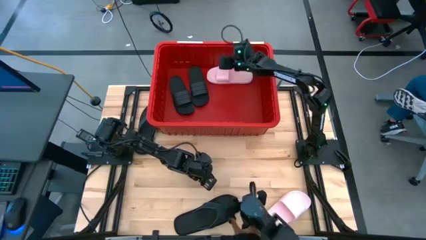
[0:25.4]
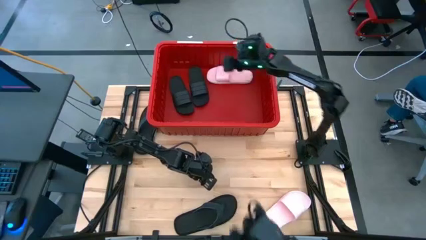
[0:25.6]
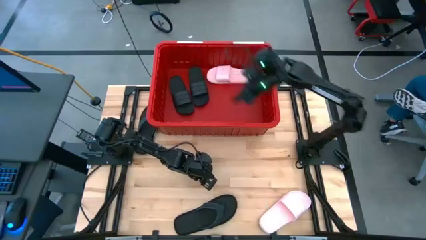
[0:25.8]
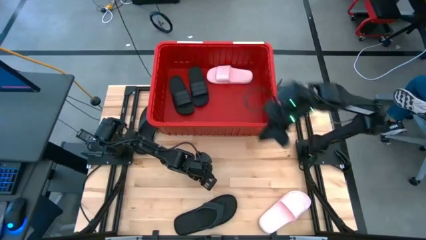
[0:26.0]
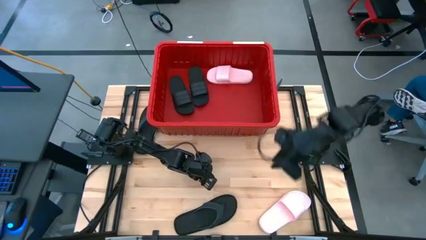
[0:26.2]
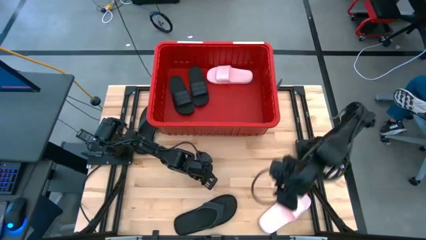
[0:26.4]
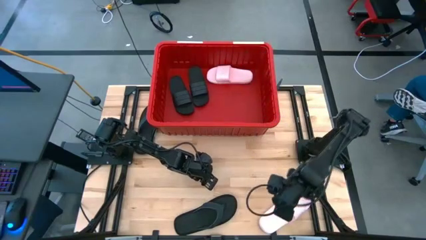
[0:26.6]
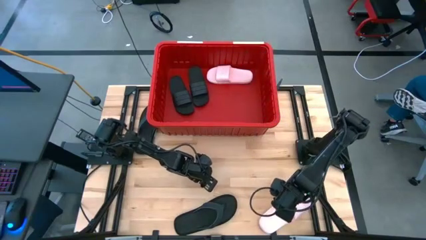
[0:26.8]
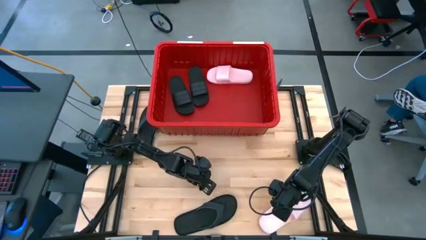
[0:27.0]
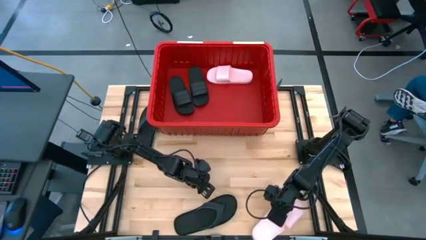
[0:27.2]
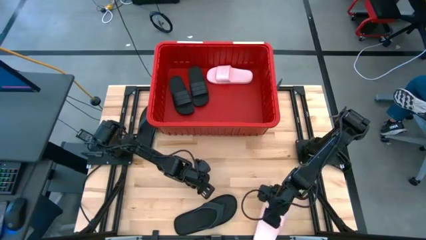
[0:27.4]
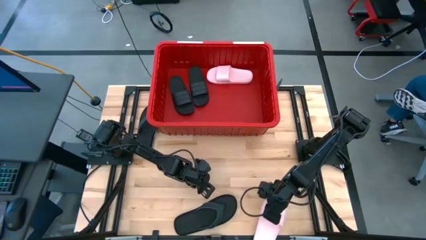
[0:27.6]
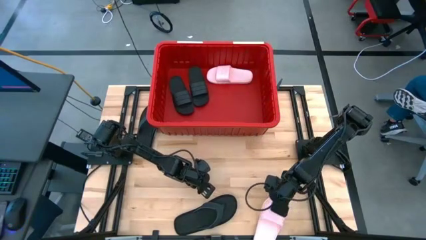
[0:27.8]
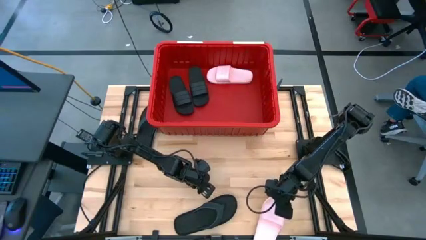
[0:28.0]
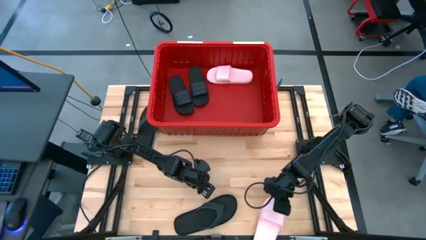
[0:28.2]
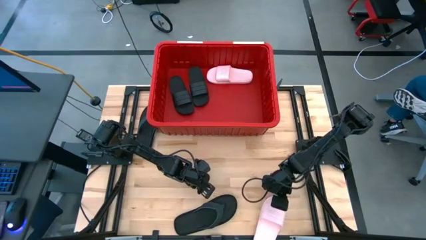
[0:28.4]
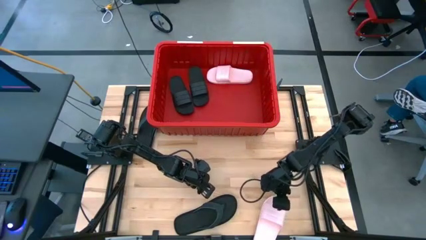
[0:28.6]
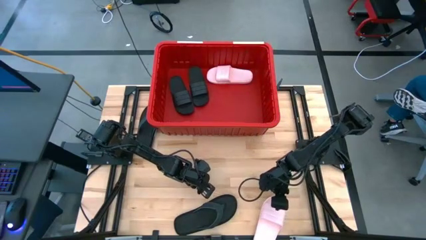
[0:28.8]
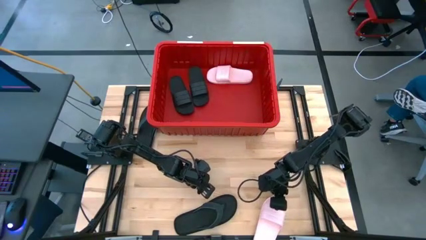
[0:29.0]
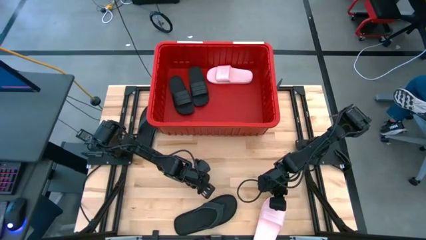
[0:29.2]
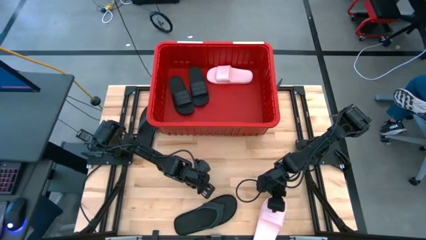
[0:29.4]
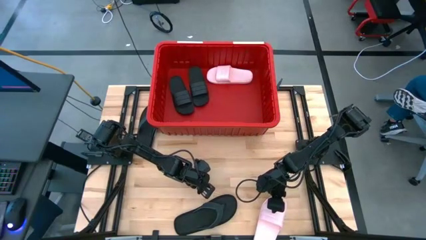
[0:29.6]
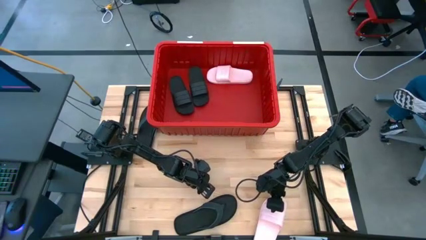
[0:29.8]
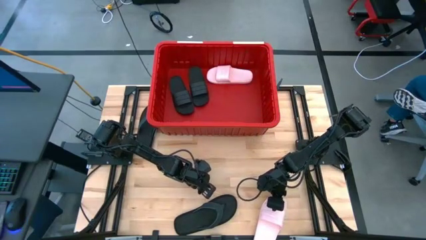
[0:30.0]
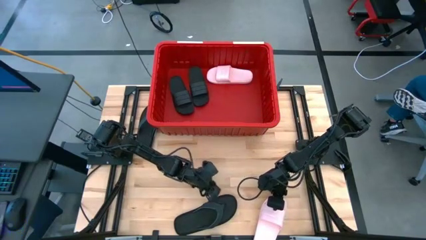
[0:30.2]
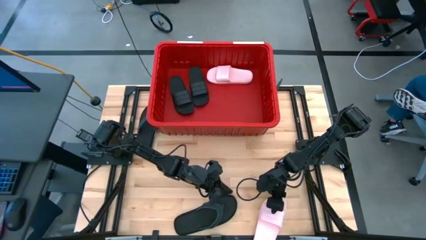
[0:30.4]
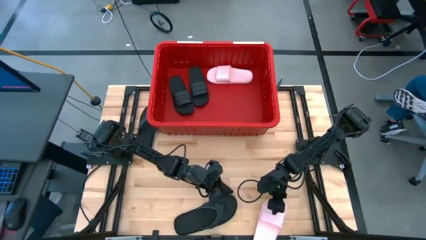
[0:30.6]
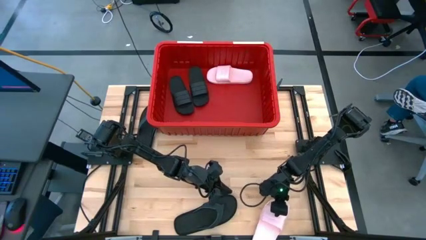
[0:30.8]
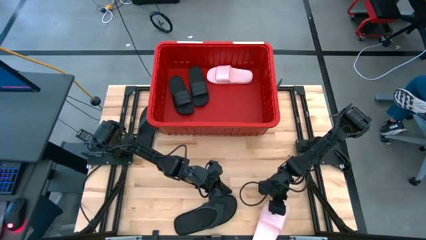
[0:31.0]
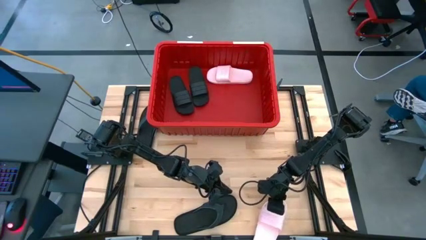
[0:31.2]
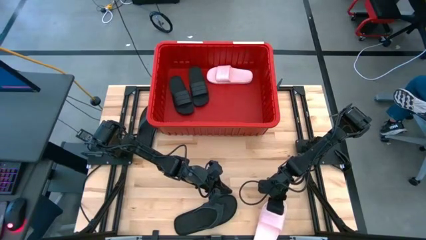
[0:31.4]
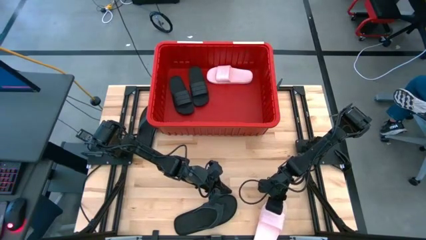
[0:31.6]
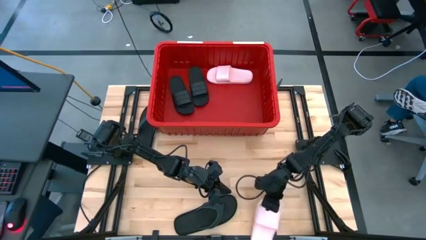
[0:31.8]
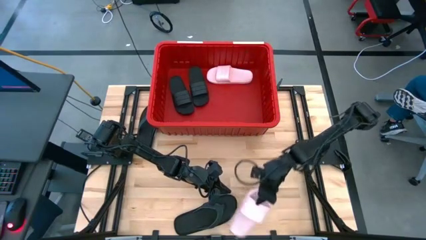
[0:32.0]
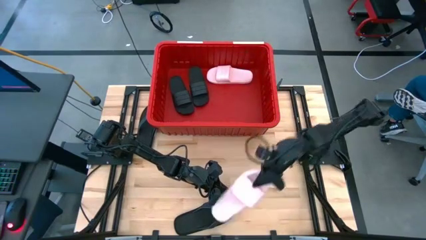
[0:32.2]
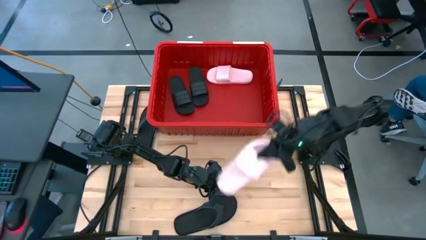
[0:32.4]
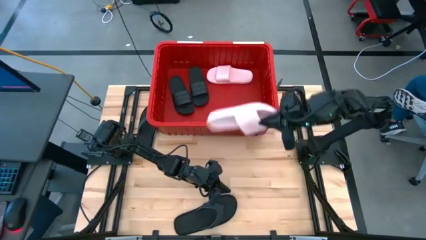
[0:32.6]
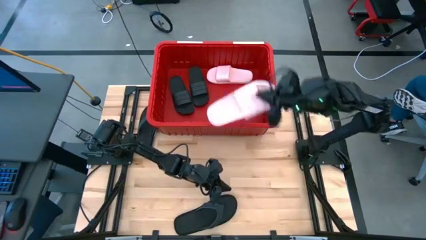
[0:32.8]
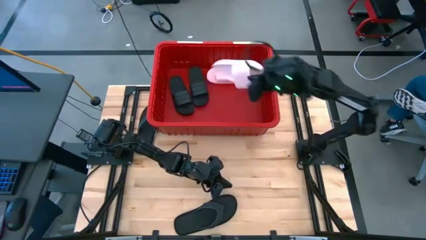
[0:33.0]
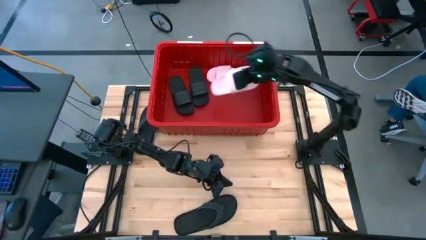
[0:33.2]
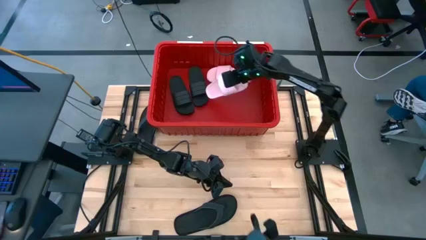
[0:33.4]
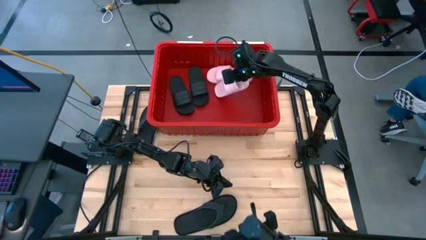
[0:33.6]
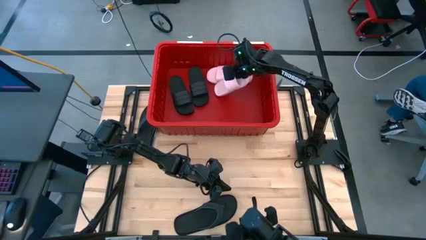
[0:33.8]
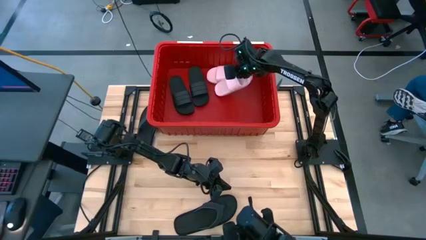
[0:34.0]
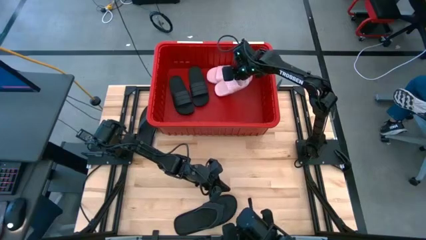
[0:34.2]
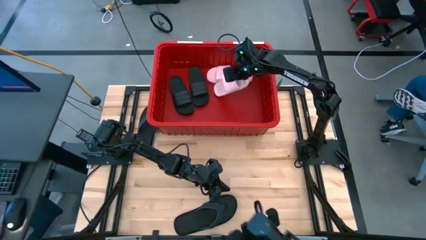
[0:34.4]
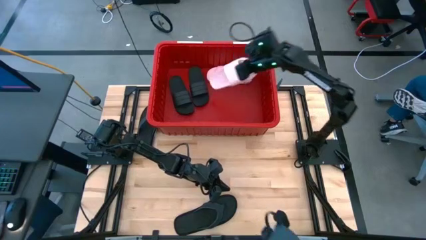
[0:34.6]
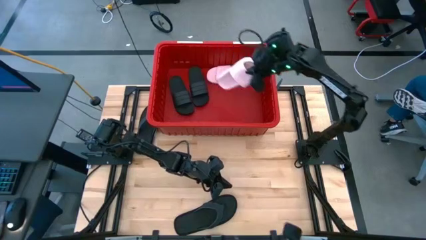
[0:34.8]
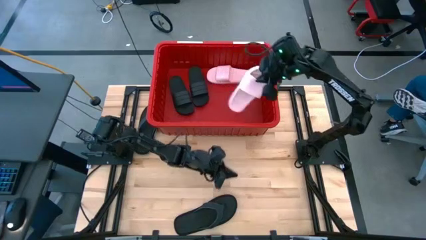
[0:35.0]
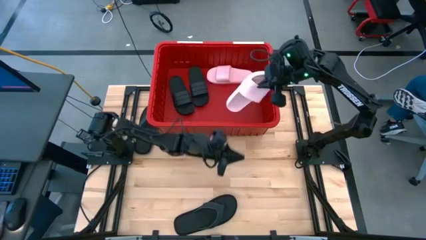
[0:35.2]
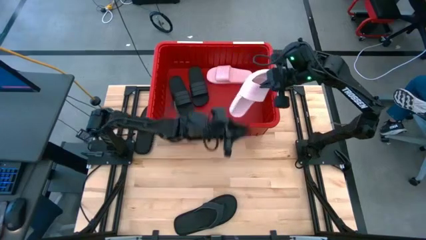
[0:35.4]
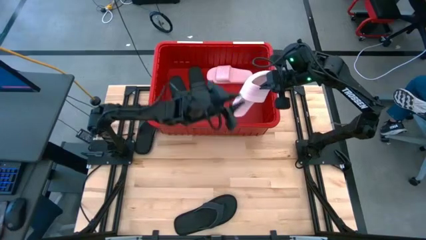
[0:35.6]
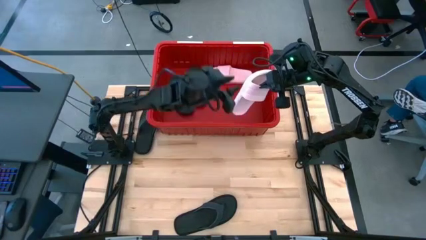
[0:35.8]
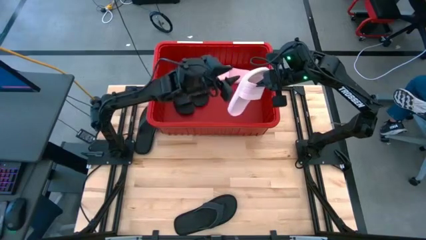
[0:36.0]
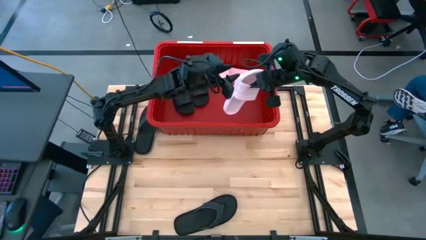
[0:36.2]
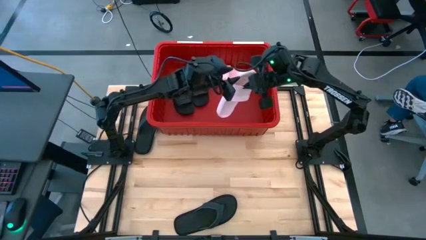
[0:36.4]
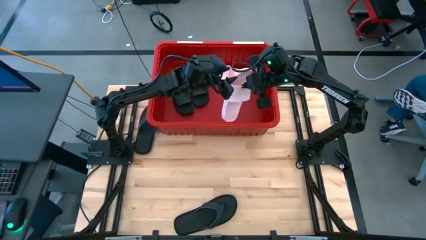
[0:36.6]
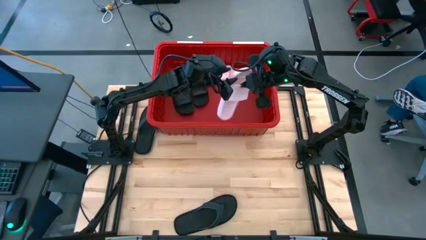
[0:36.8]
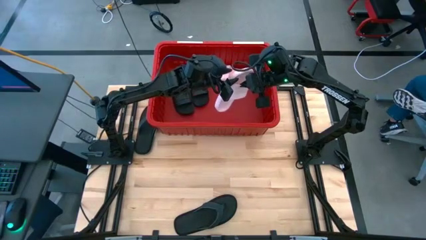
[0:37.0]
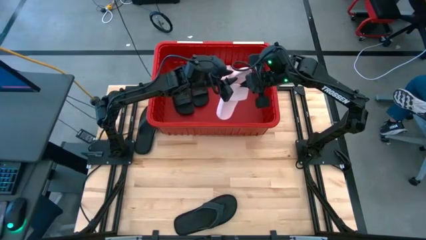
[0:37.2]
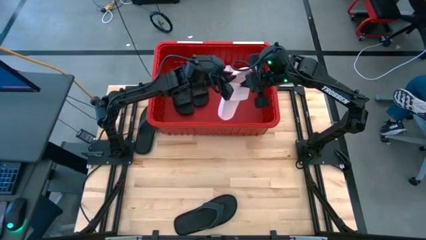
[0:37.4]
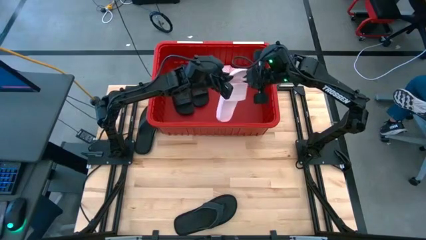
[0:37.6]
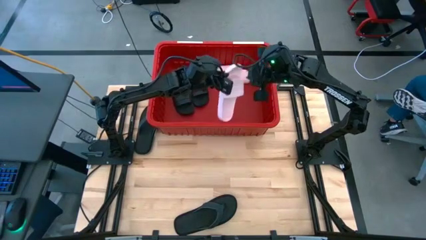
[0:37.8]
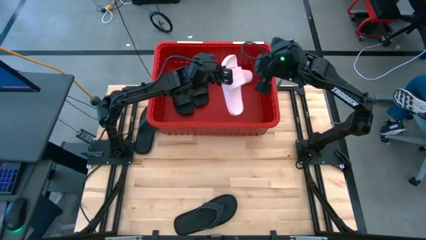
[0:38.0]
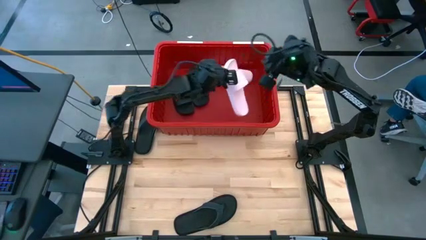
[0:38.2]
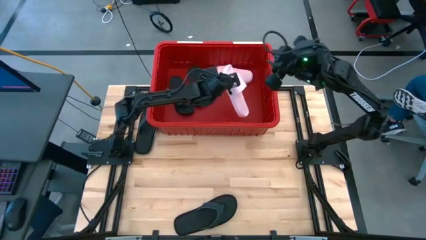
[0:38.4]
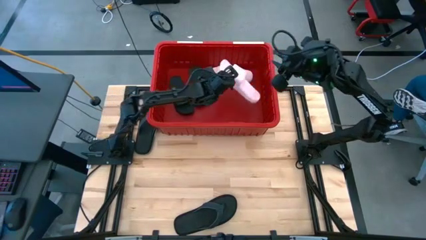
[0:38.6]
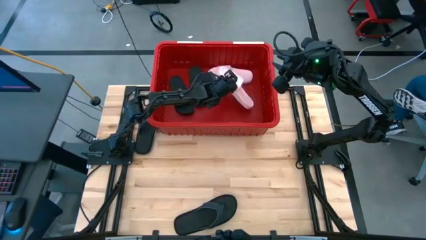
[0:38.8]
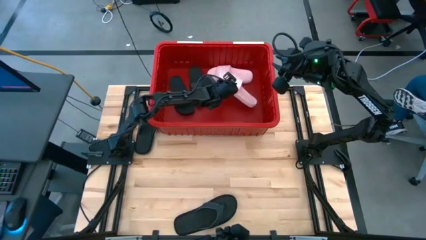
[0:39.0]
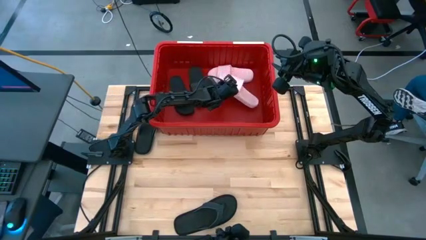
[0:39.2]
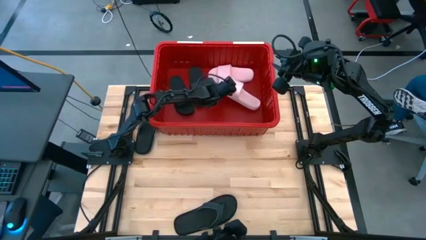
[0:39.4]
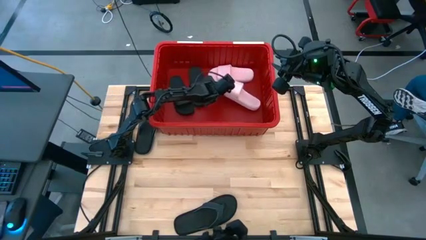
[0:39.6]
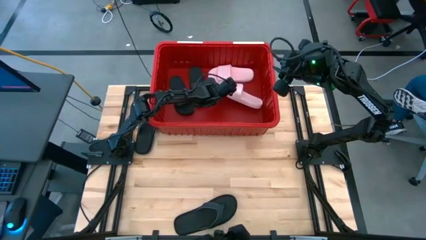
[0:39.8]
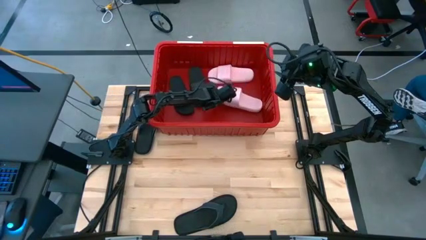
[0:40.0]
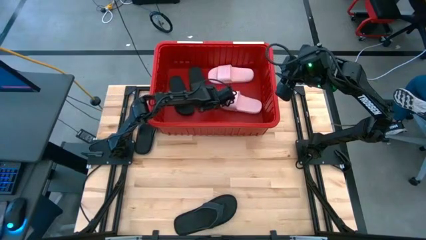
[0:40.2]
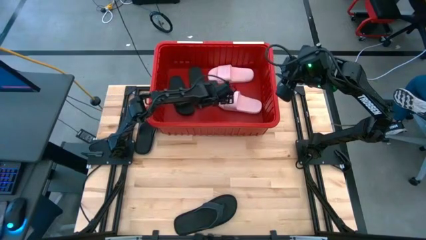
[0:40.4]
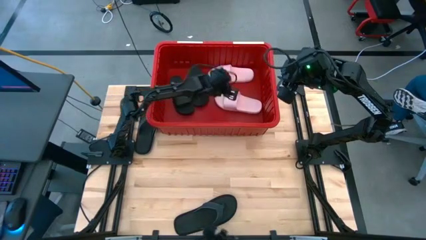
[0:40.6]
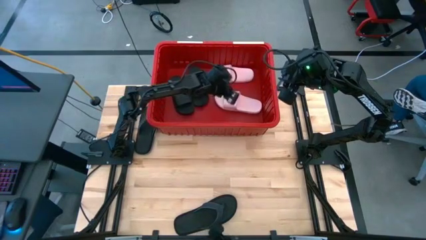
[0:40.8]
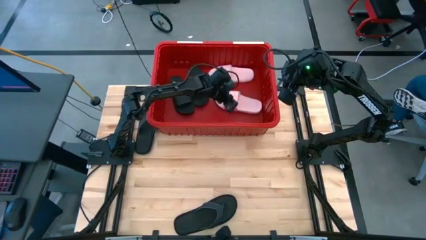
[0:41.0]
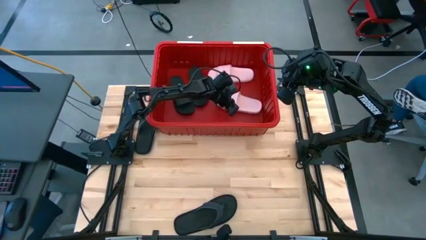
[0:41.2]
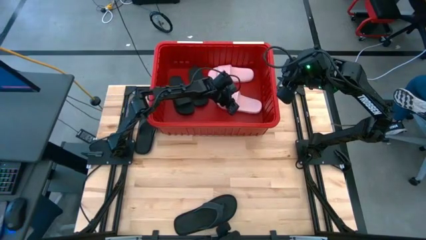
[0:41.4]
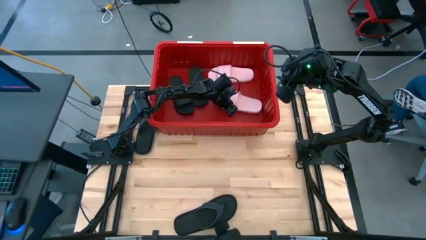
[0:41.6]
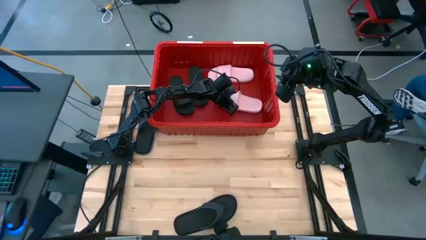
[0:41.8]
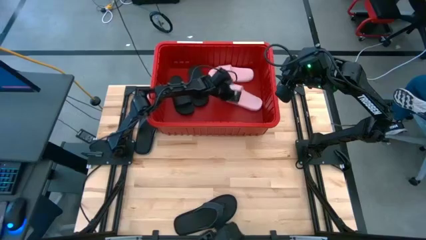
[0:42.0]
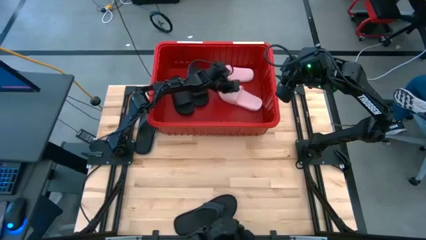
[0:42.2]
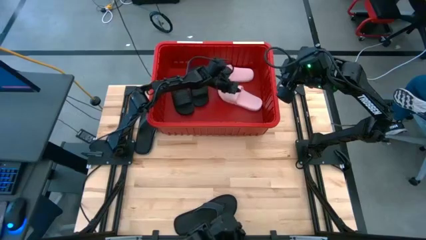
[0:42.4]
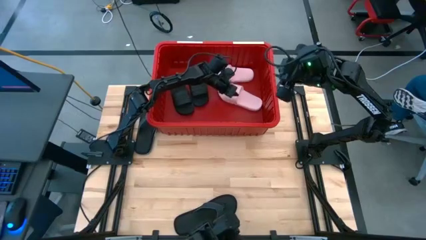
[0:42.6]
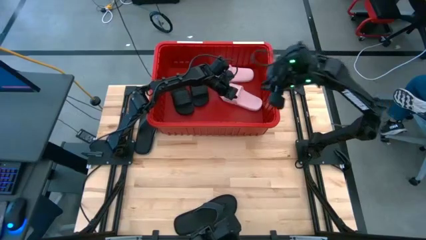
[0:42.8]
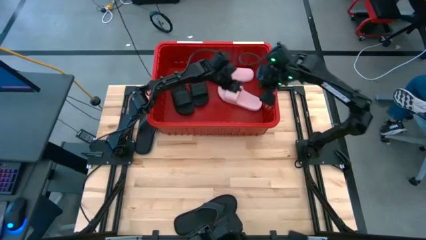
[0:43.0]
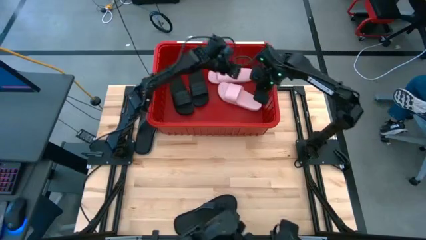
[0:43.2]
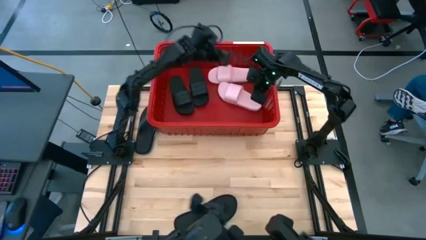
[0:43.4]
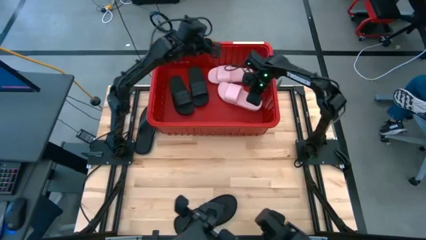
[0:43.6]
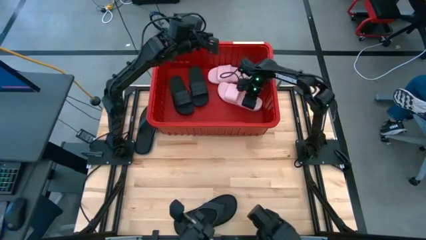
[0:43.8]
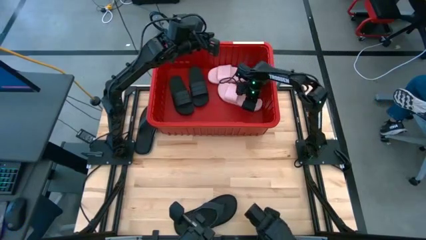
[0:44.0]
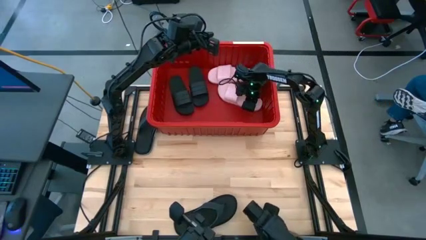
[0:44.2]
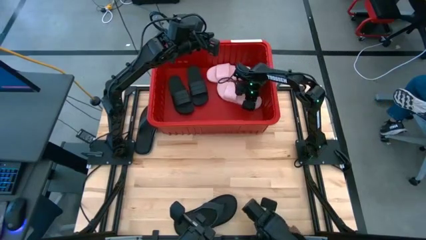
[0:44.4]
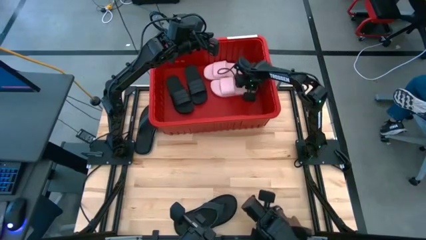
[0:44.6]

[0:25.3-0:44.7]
Task: Pick and place slides into bin
Put the pink slide into the red bin
